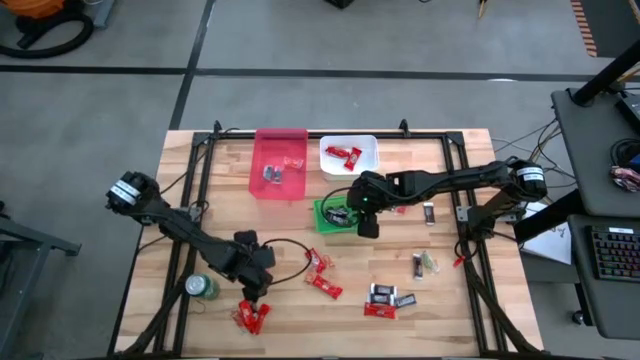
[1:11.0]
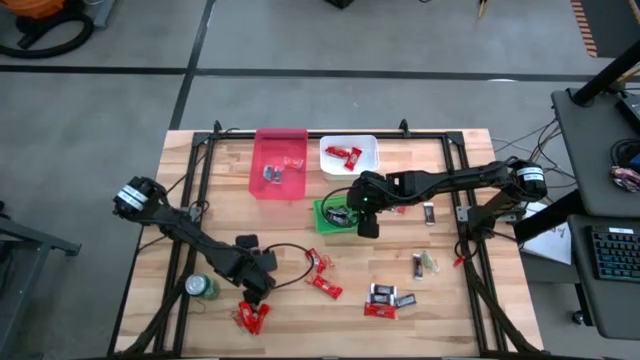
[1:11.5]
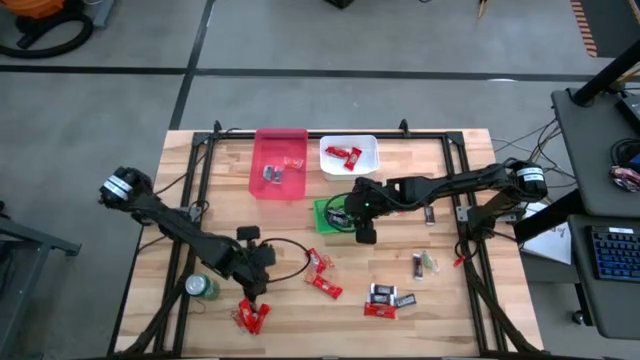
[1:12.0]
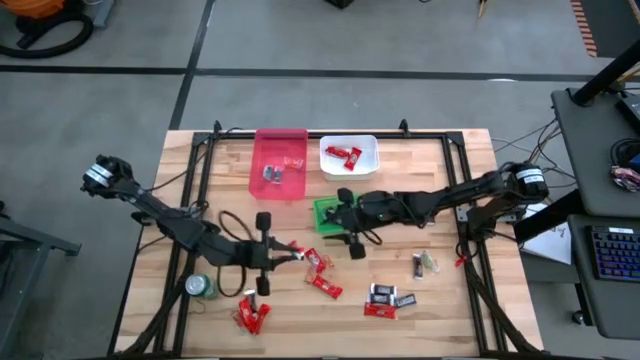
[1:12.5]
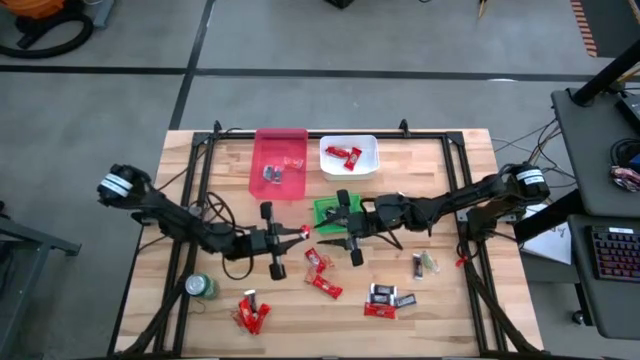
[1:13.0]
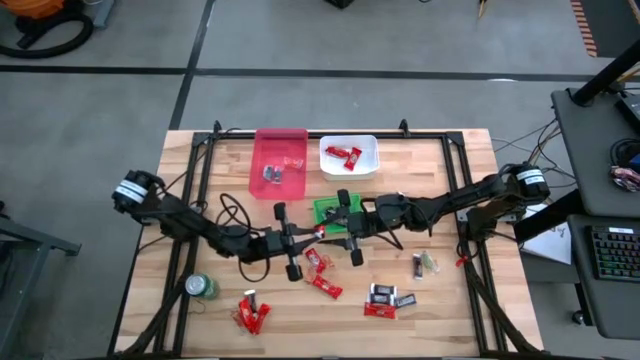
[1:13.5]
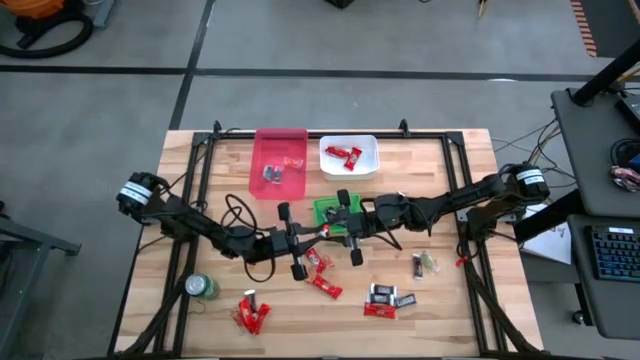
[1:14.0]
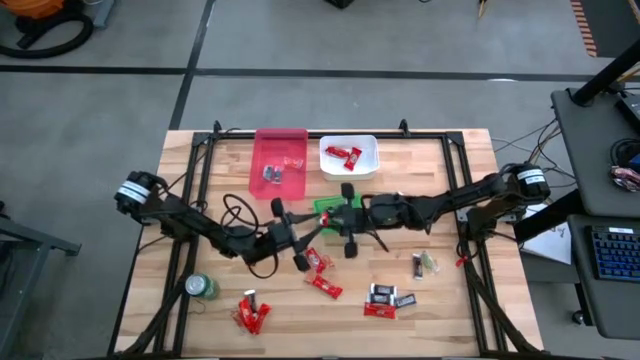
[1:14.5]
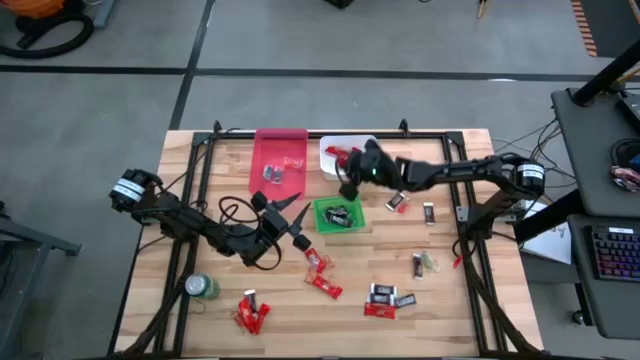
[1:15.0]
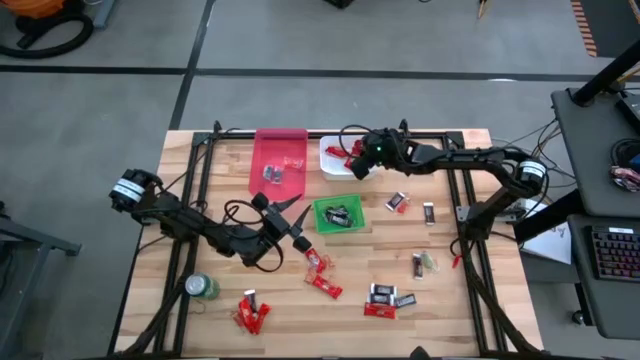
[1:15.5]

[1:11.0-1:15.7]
Task: Sort candy
Put the red chocolate bar into the white bin

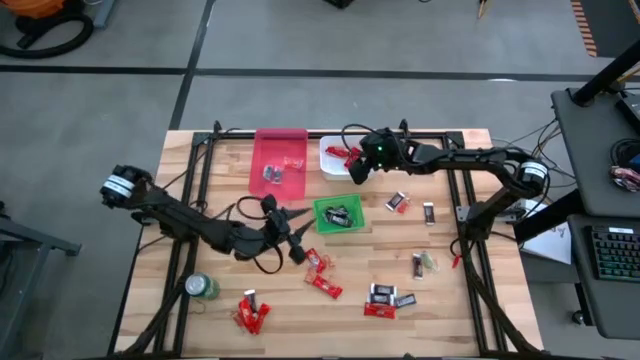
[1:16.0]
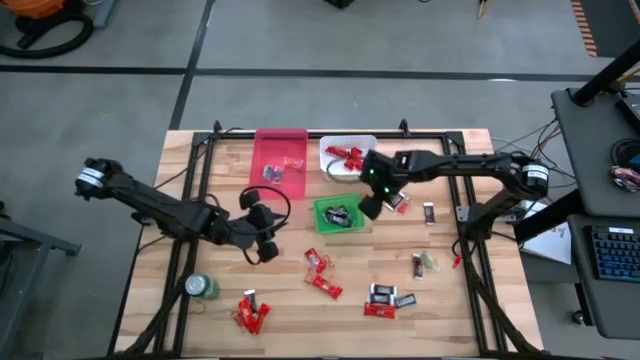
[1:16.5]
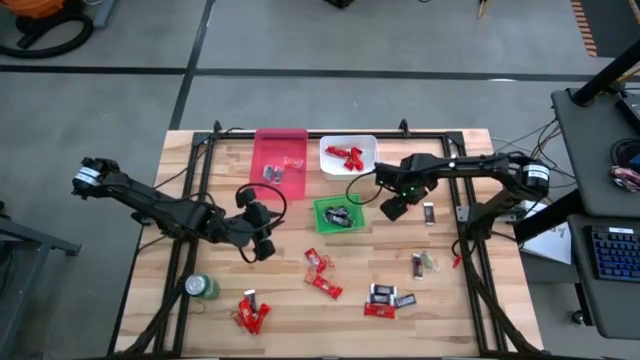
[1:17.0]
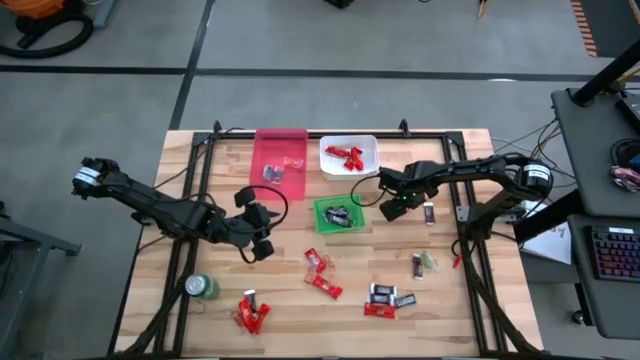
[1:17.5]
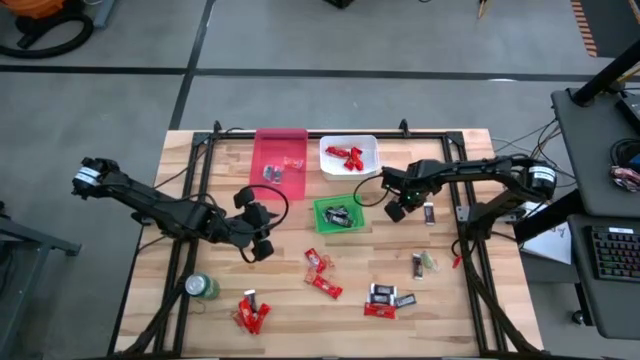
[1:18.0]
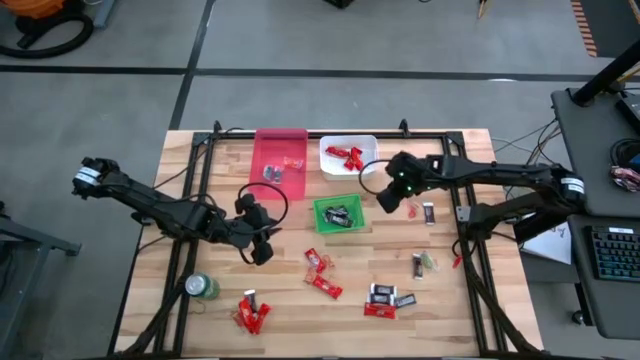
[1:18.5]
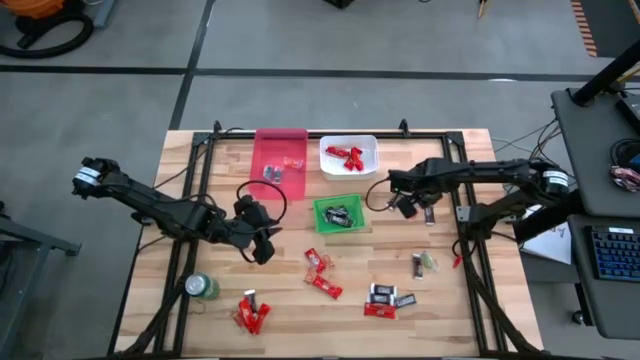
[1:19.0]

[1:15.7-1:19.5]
Put the orange gummy candy into the red bin

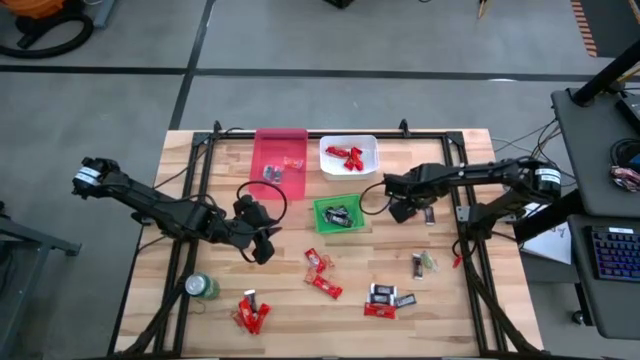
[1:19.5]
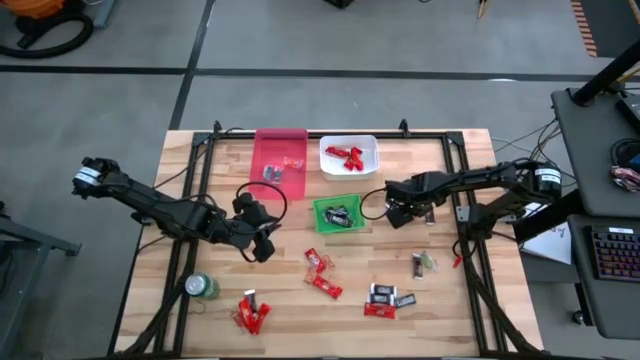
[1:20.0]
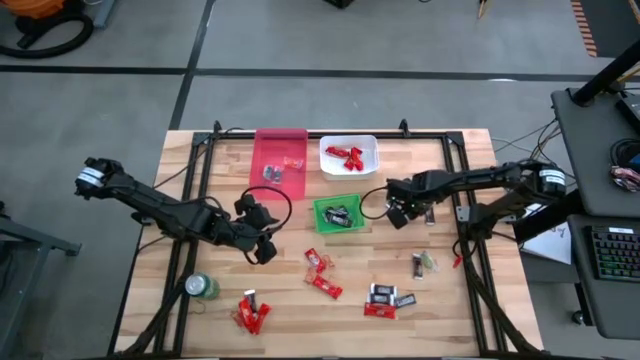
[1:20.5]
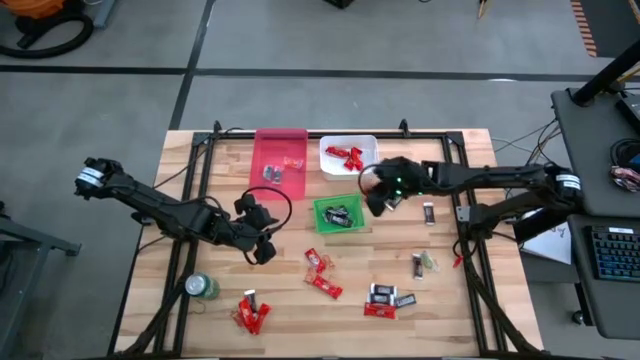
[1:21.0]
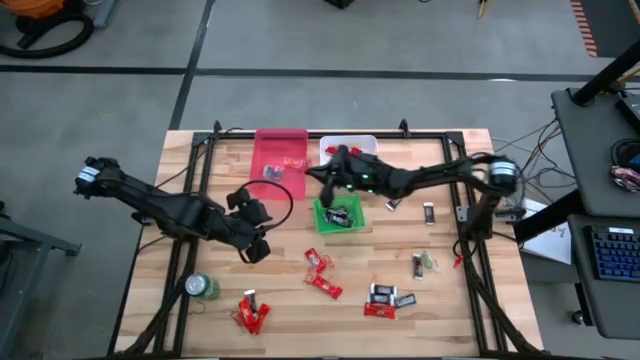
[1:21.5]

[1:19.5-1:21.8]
Put the orange candy into the red bin

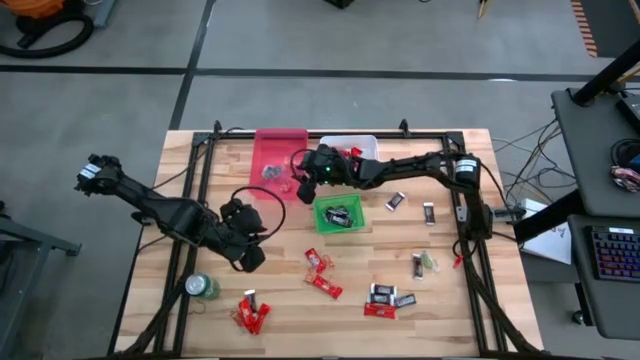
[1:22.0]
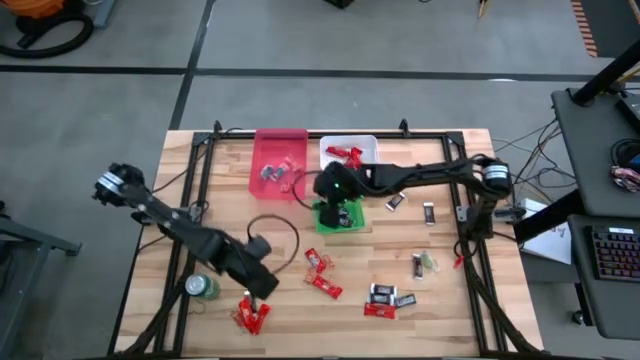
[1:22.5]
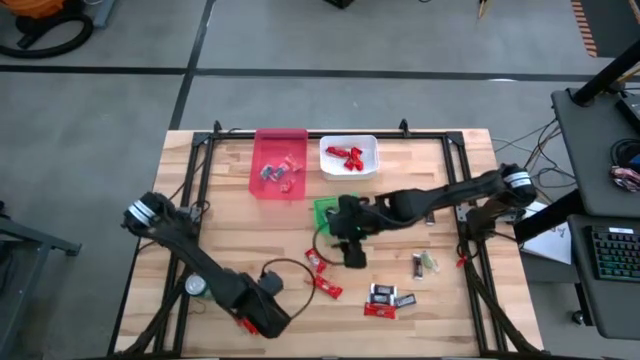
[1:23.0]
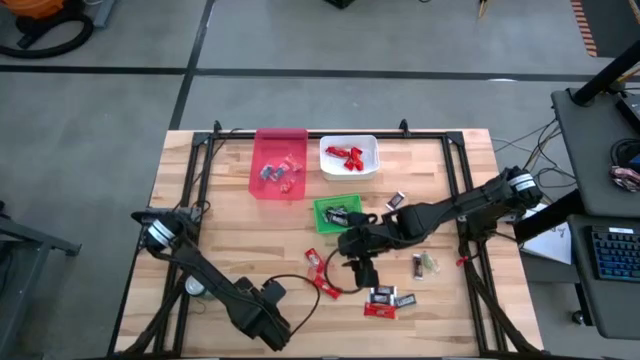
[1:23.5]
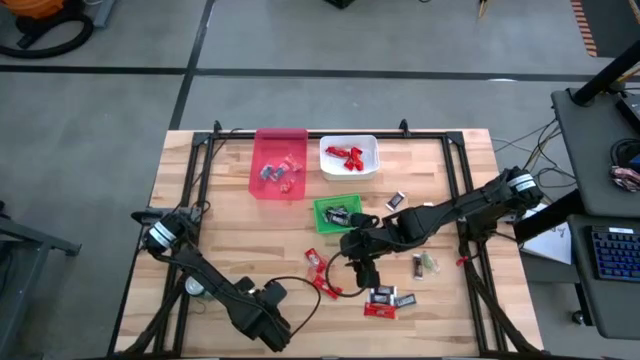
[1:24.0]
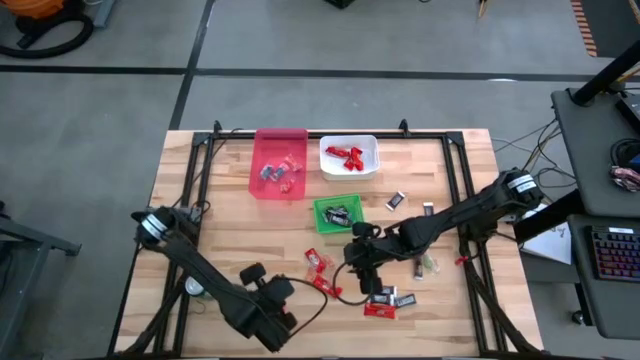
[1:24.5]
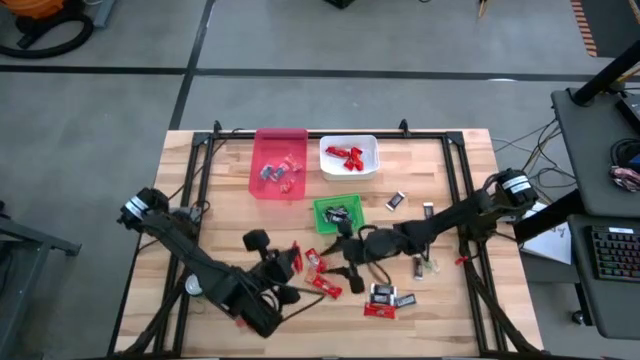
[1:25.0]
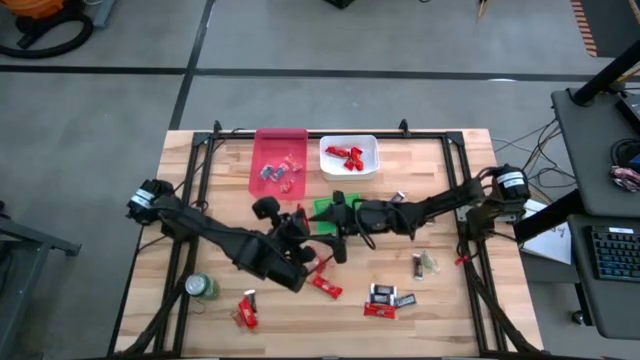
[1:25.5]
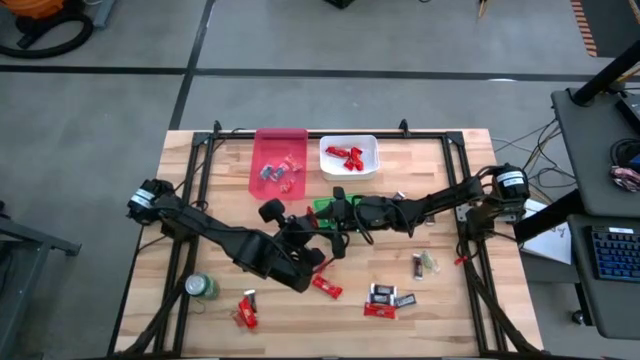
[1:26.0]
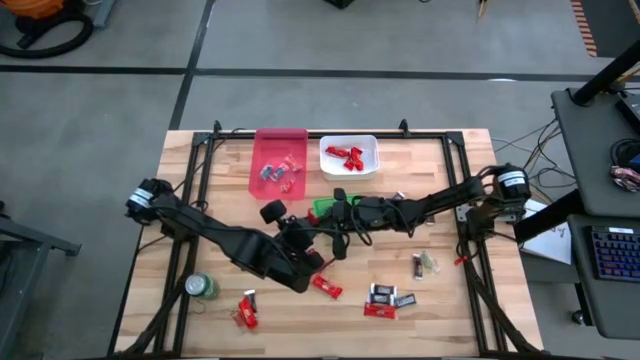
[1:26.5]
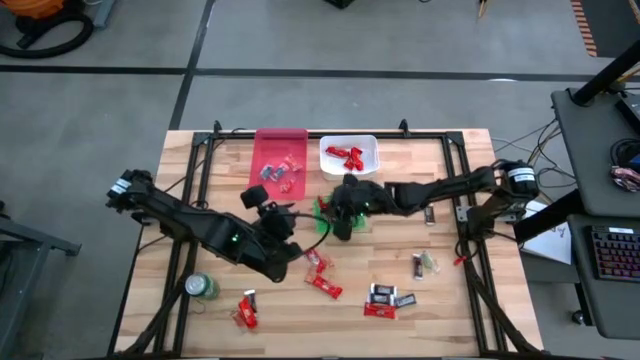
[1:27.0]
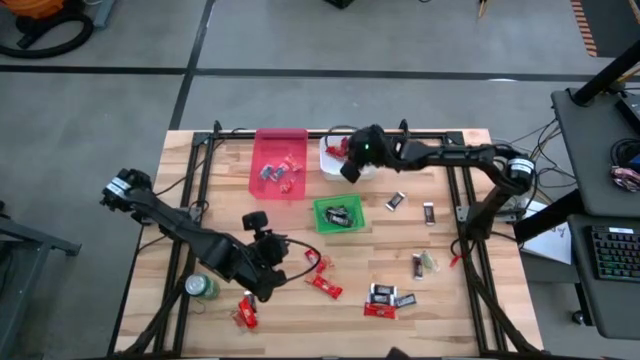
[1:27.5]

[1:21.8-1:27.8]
Put the red chocolate bar into the white bin

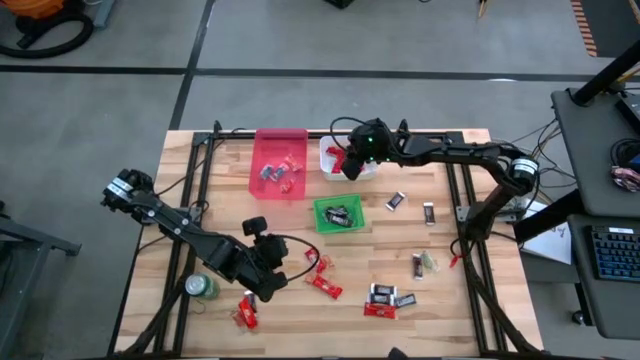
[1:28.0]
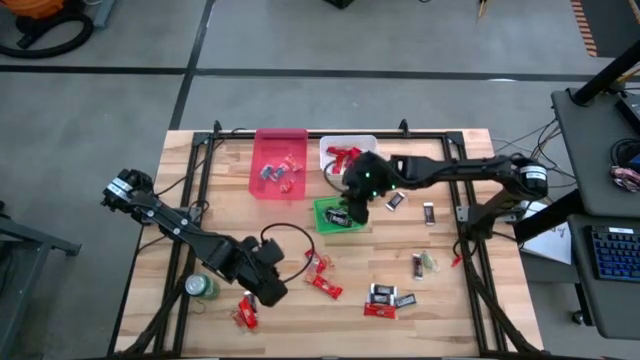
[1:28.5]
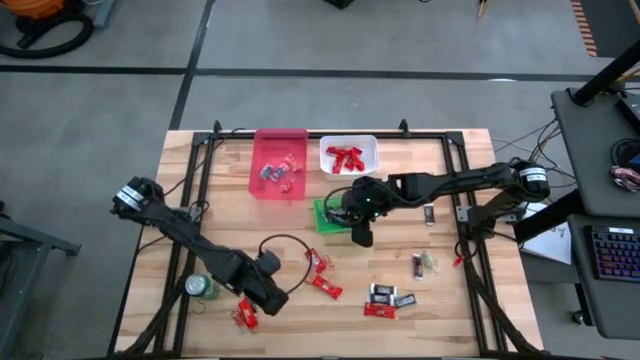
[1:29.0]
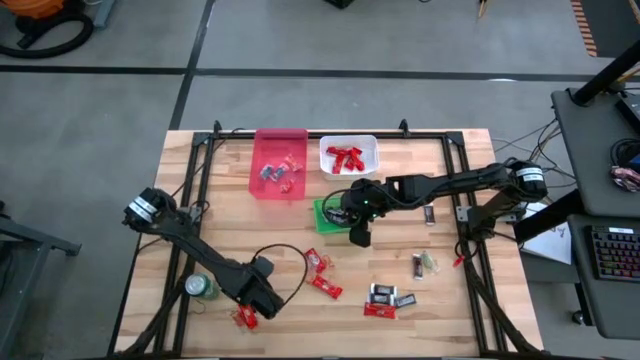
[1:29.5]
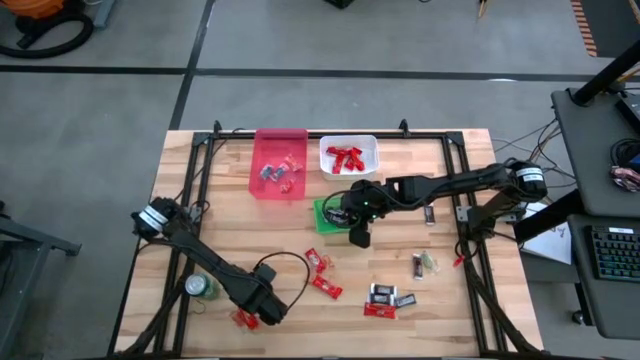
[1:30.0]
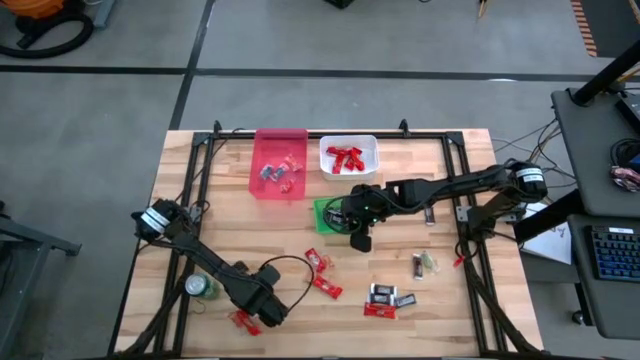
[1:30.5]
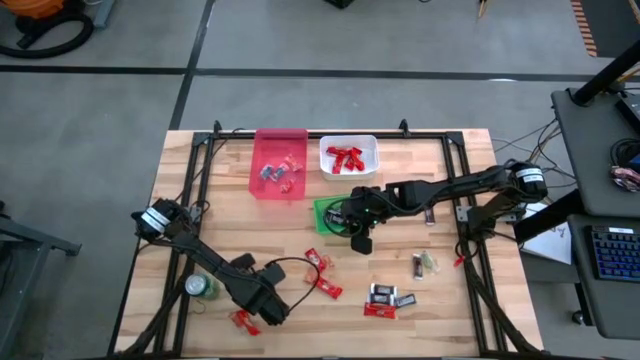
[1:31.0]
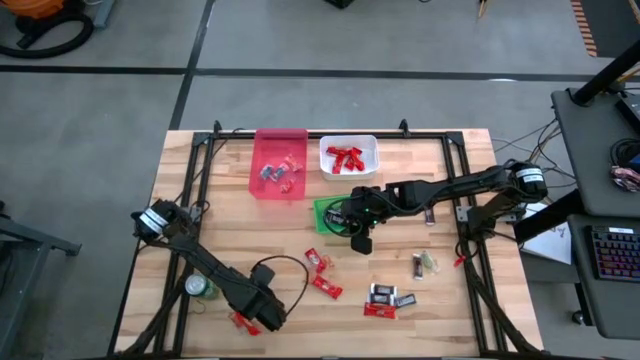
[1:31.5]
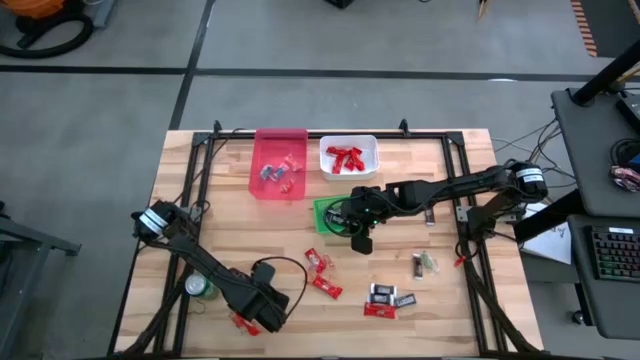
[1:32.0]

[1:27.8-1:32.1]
Put the brown chocolate bar into the green bin
